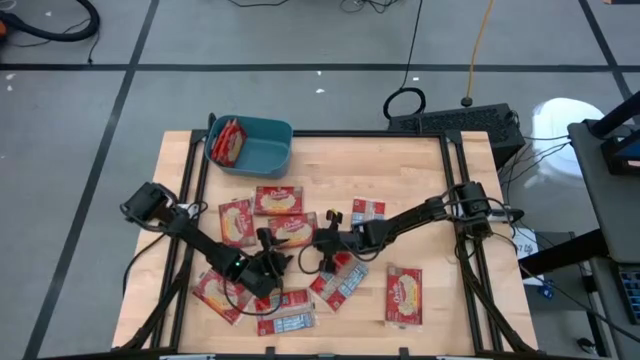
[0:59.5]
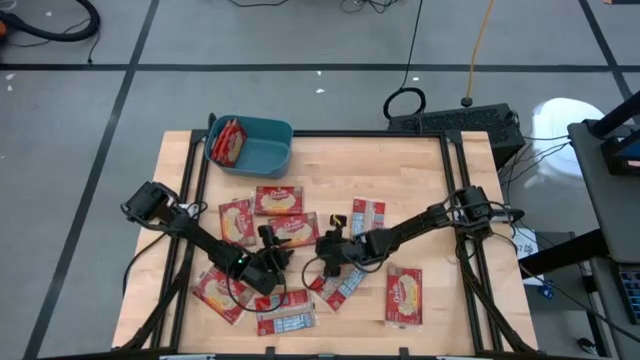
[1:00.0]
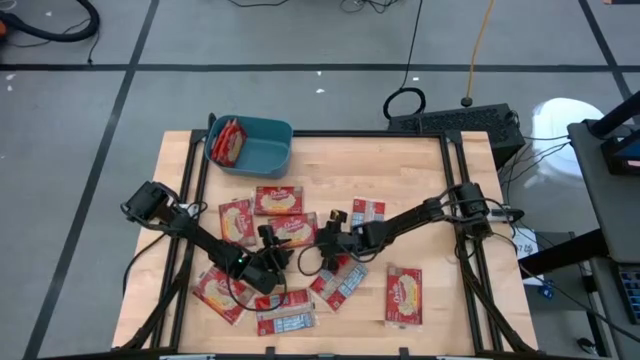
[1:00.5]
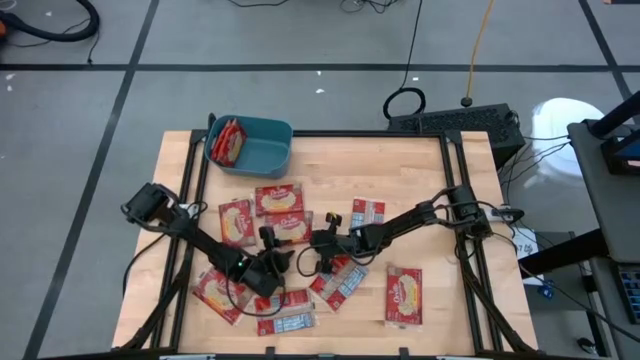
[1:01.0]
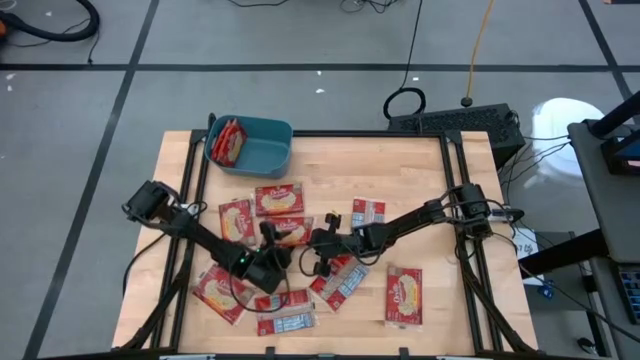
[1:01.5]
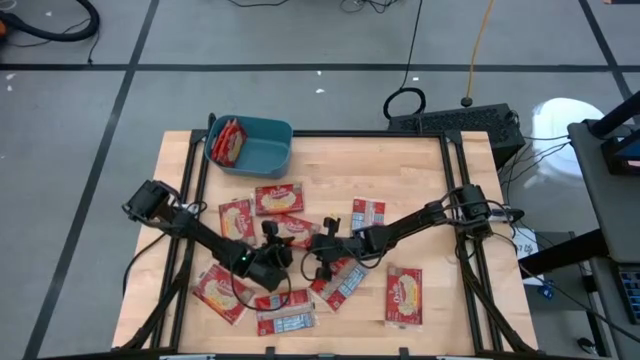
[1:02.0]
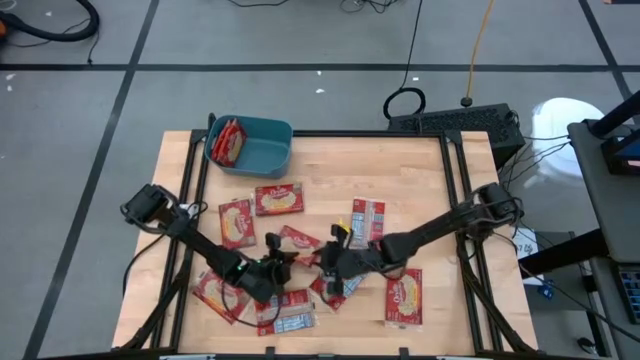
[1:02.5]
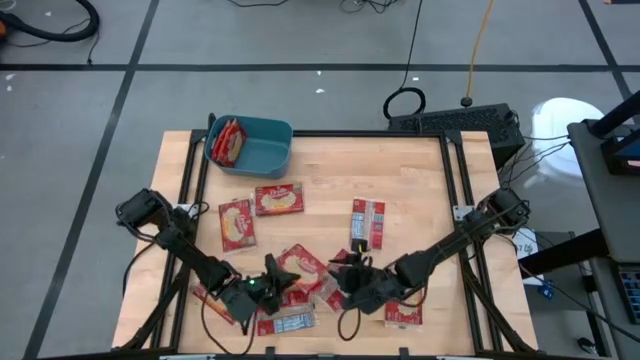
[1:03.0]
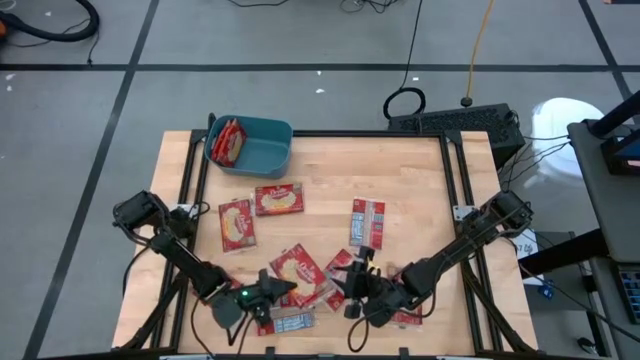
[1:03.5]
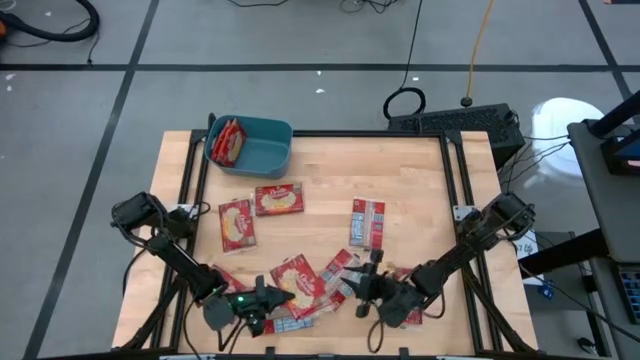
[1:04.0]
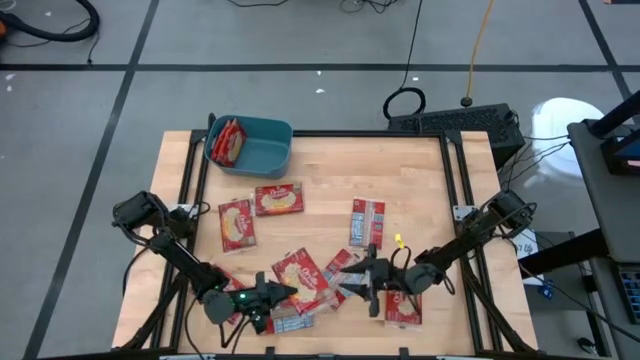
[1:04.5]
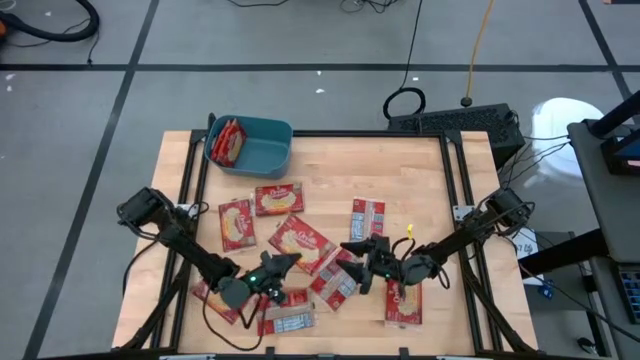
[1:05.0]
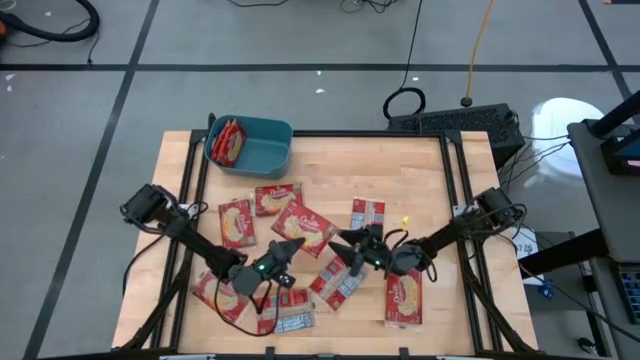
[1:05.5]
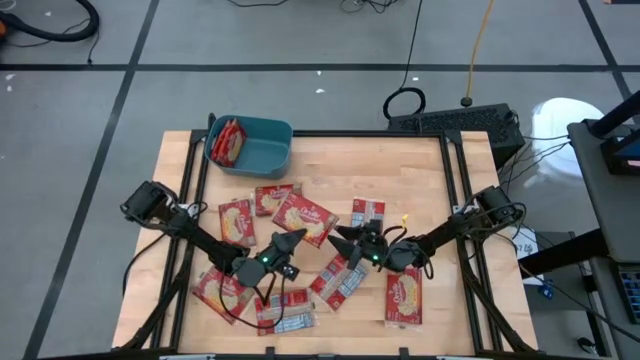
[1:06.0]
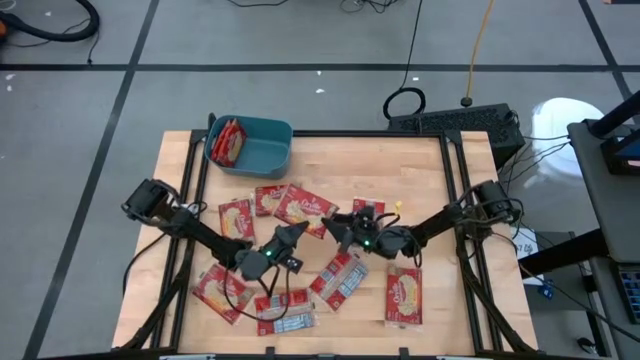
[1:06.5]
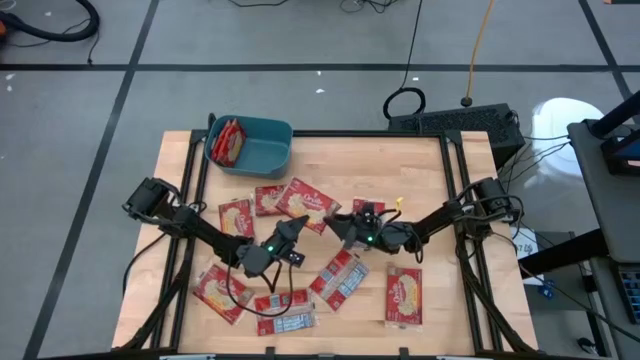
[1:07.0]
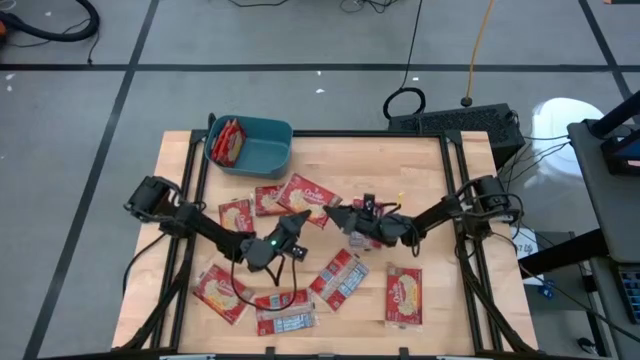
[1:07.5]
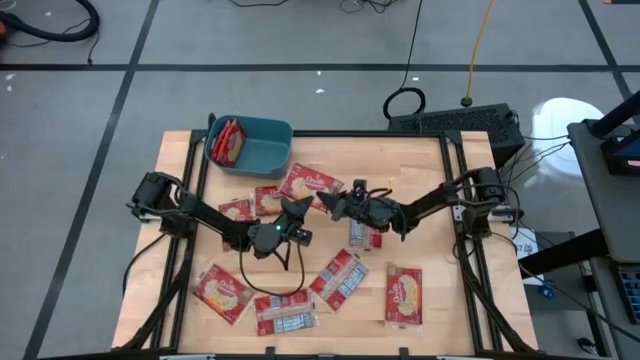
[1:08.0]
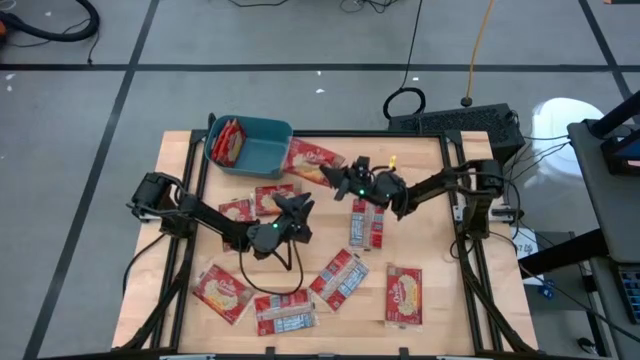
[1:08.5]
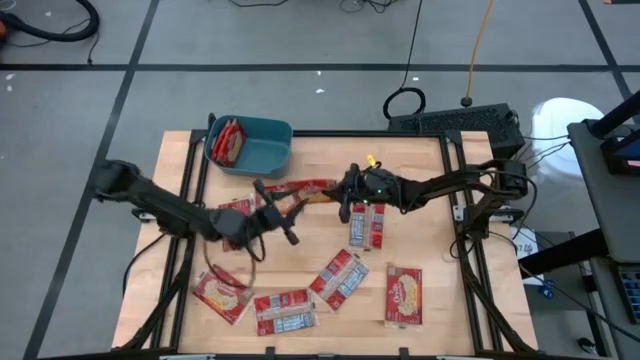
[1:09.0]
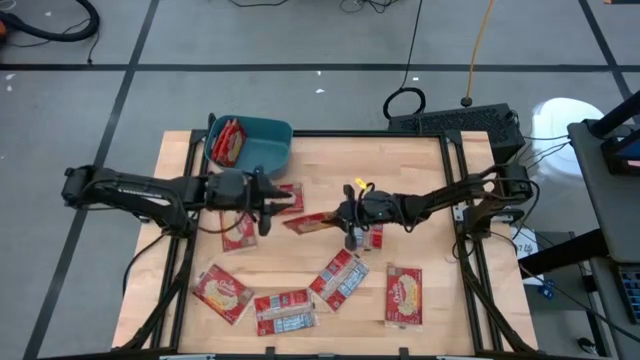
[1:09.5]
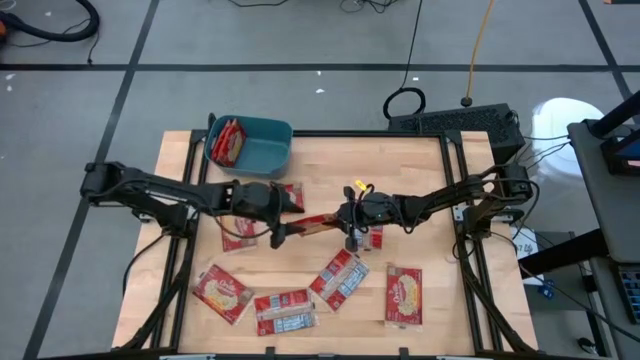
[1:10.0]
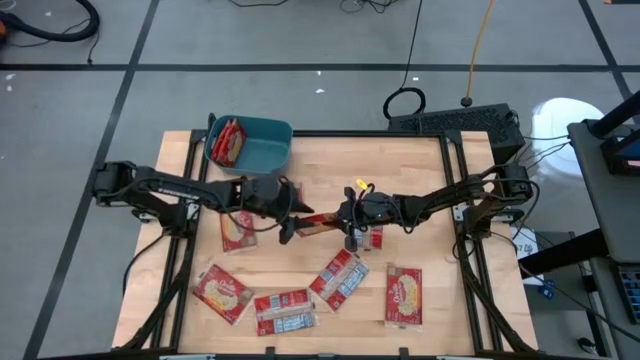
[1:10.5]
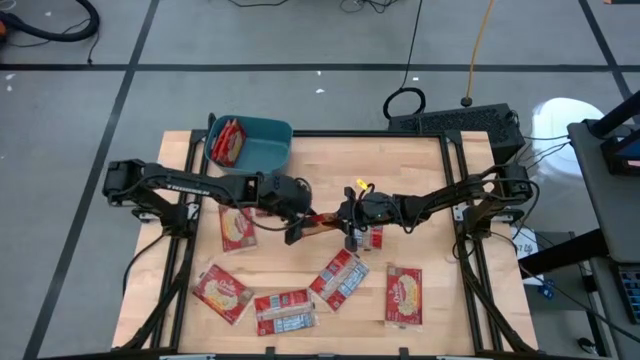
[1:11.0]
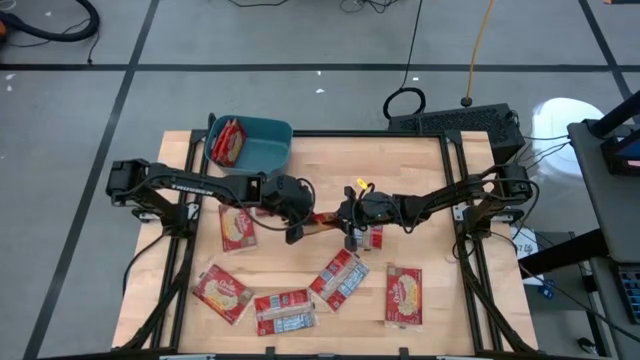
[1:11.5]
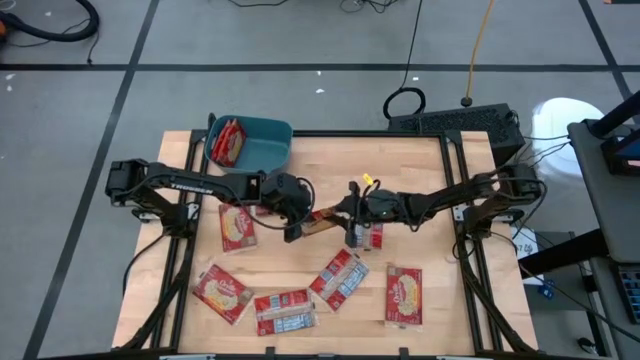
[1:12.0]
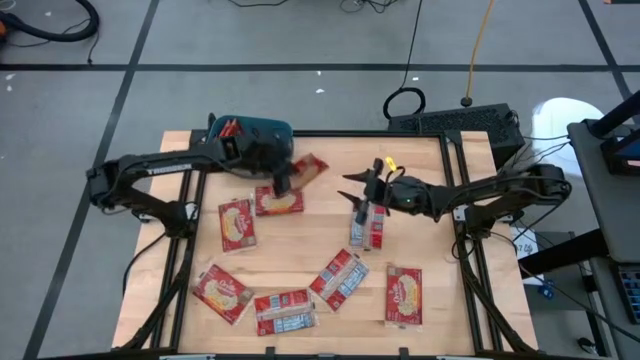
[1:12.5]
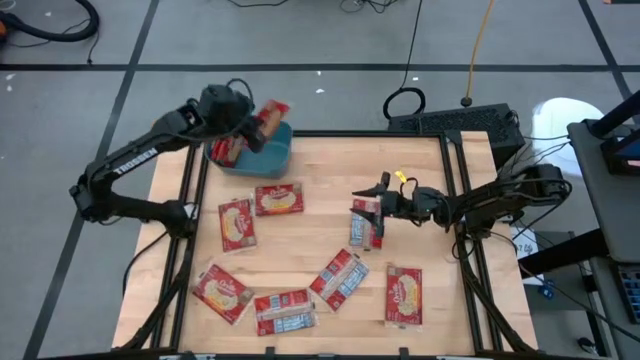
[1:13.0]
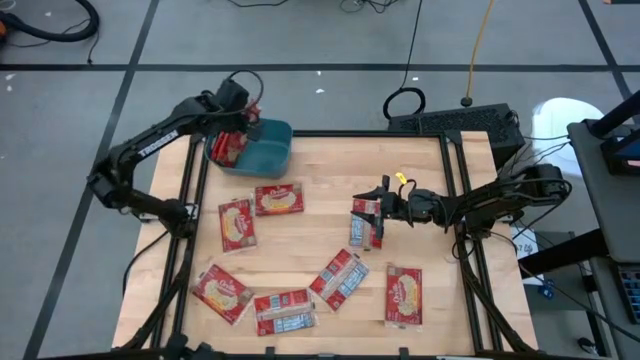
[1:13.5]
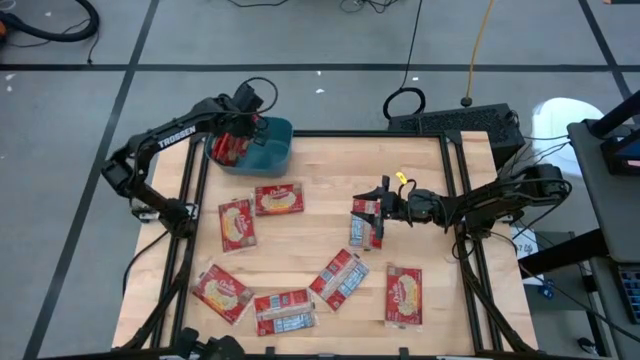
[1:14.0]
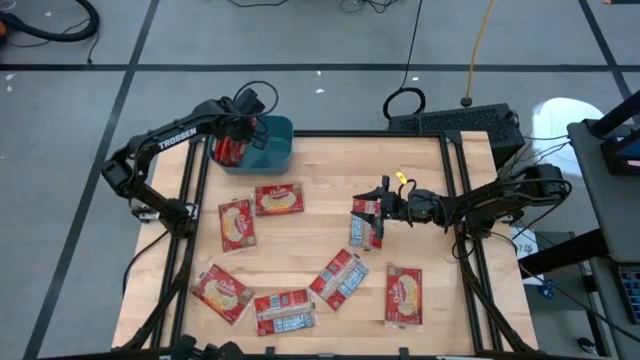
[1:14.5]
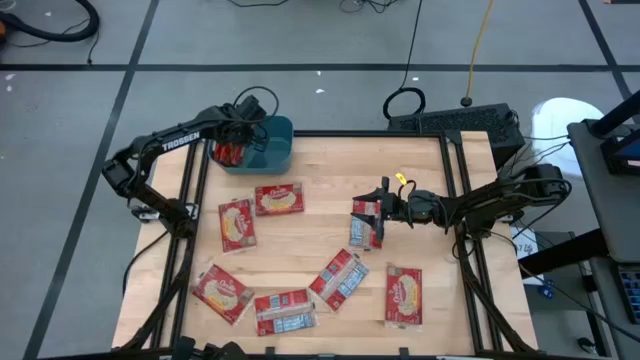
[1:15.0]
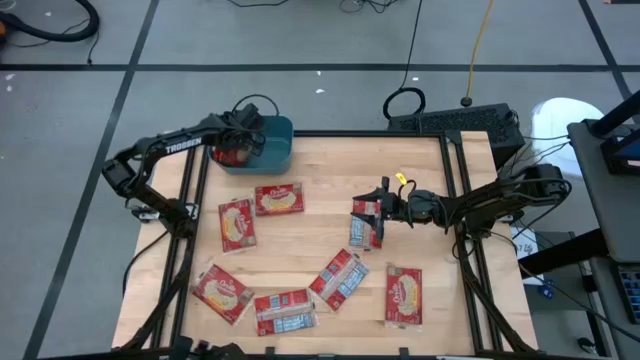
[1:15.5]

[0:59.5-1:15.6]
Task: Sort popcorn bags into baskets
Put the red popcorn bag into the blue bin

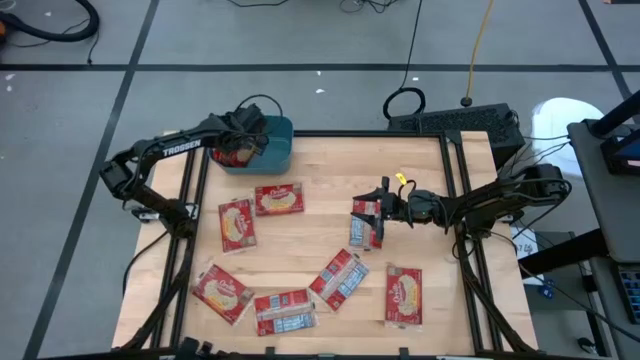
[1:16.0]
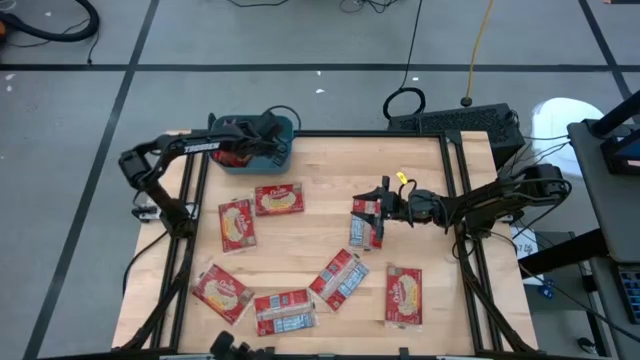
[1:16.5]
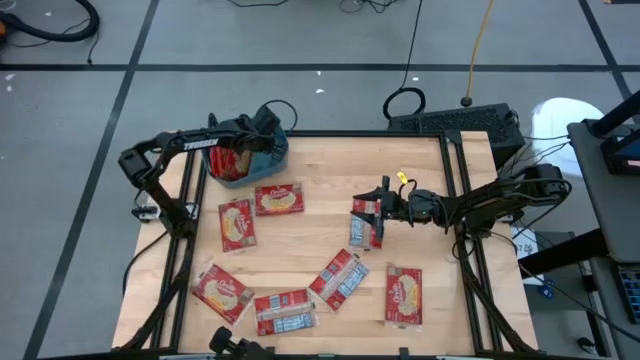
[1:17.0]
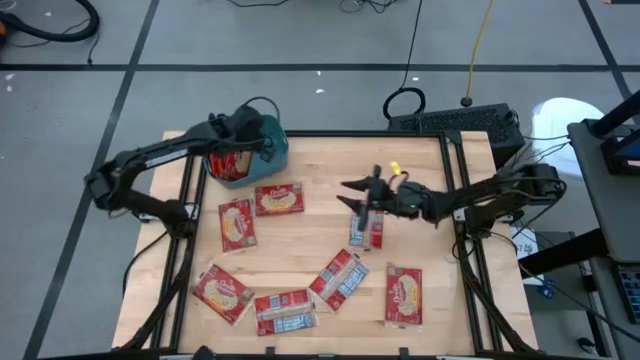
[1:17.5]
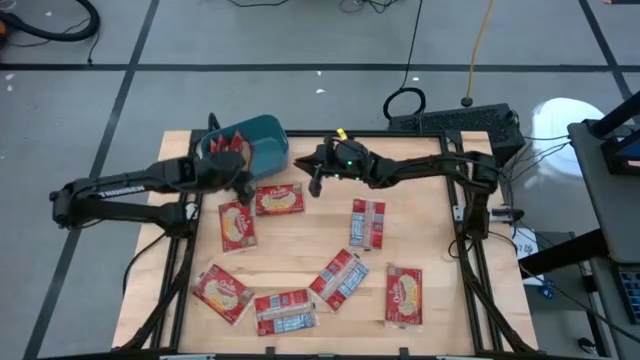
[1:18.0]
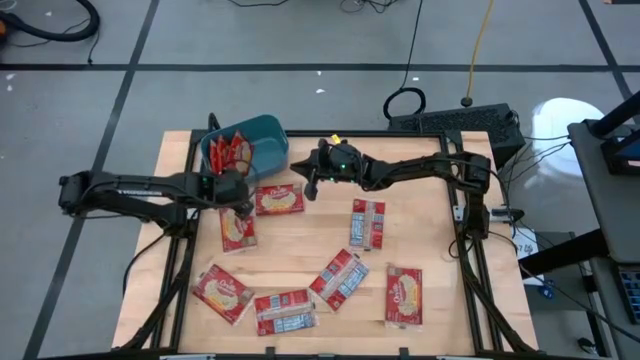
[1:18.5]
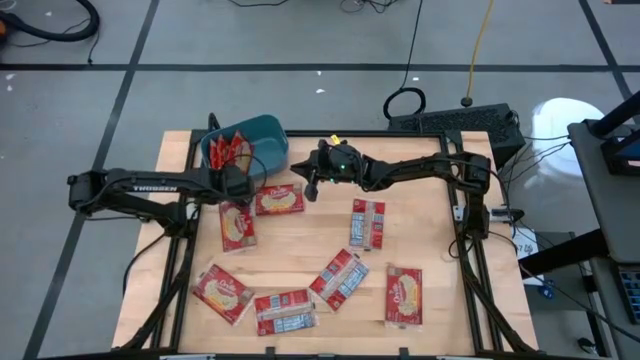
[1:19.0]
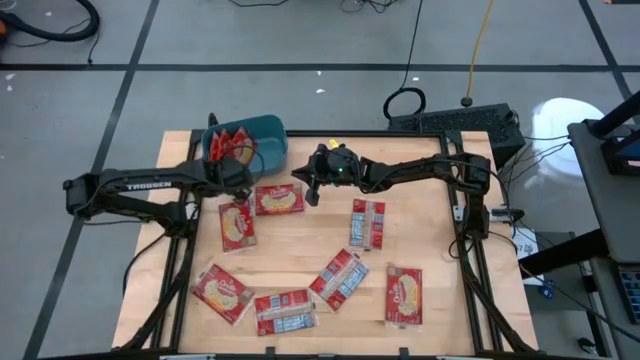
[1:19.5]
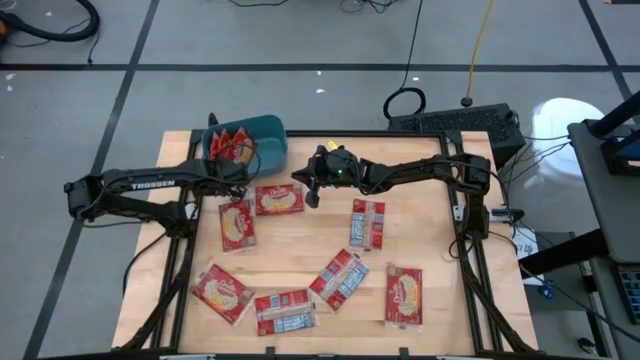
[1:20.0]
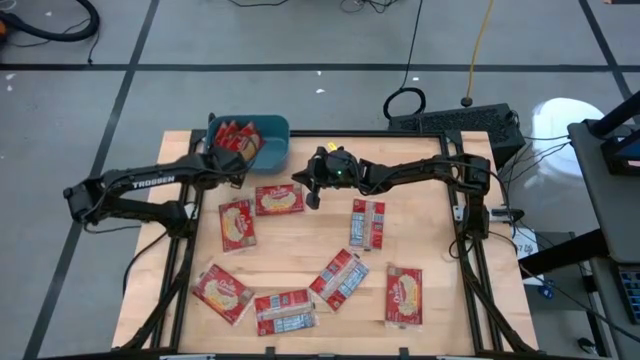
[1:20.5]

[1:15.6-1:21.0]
Adjust the blue bin
